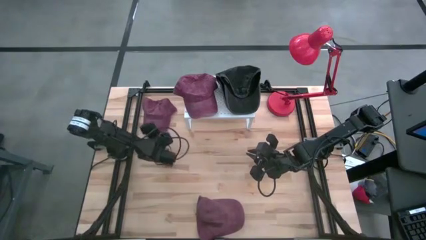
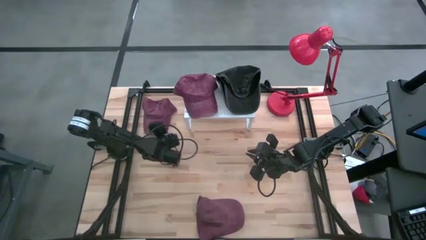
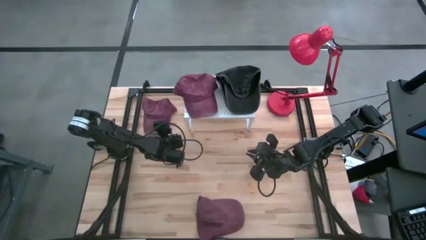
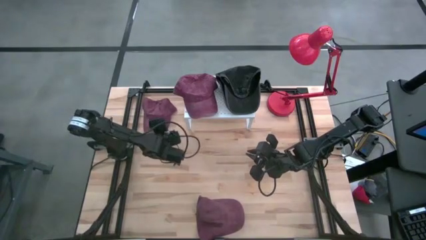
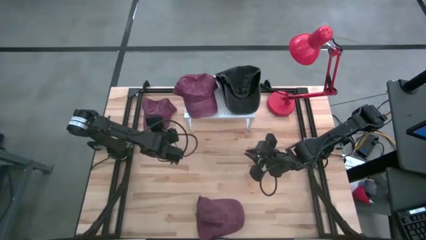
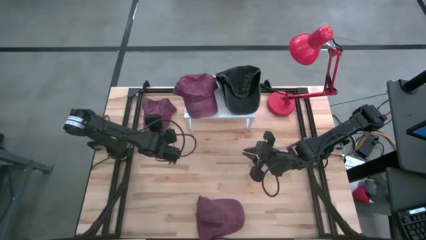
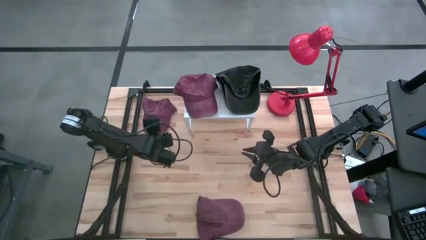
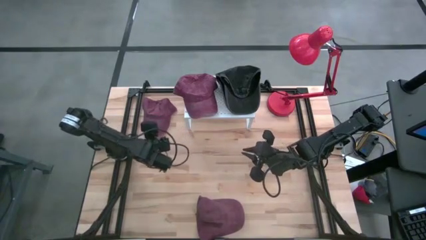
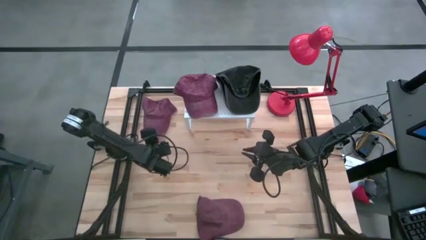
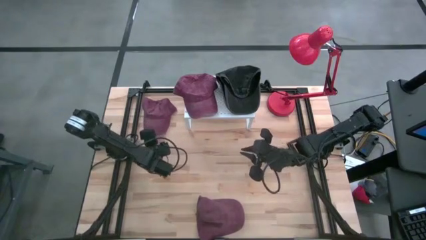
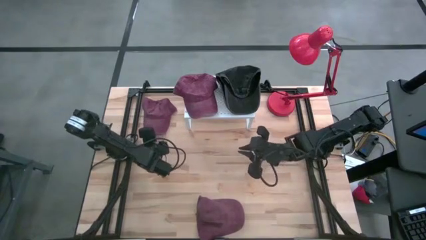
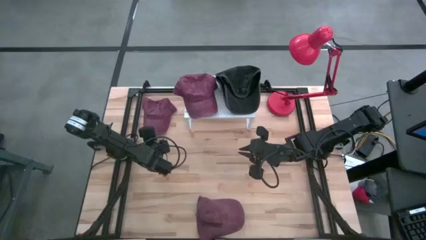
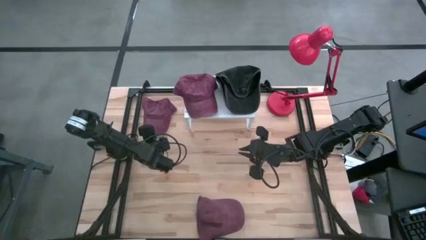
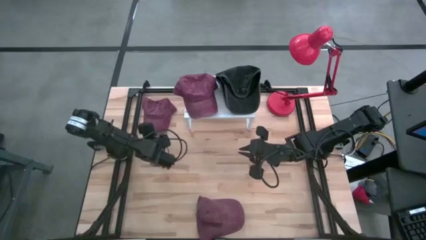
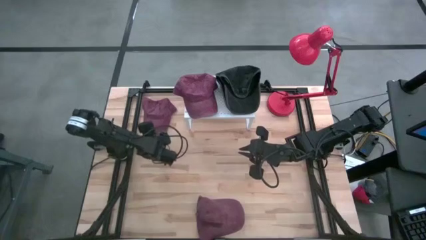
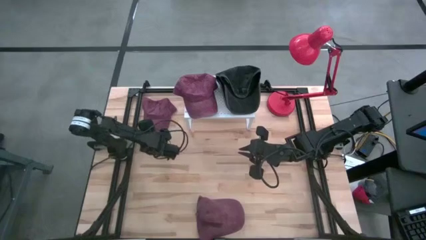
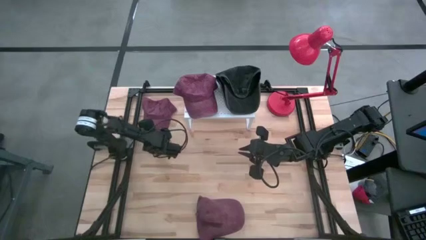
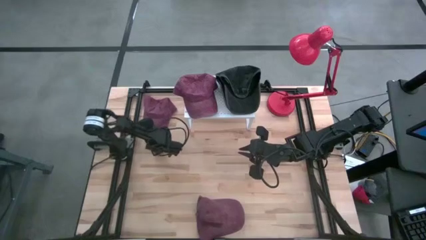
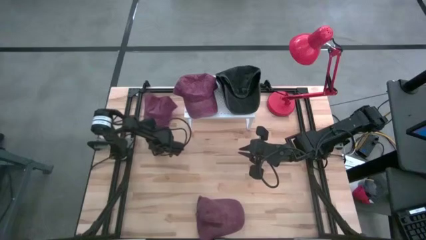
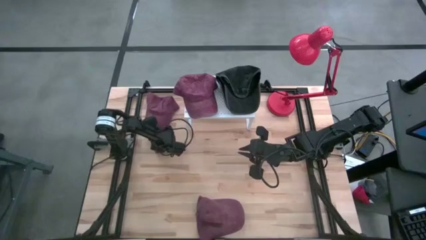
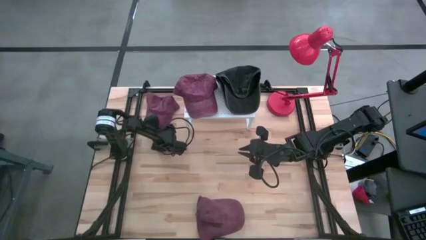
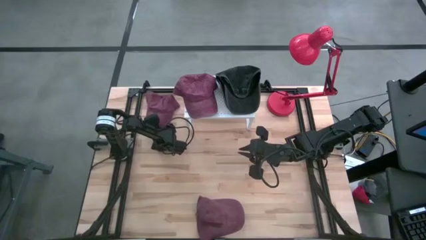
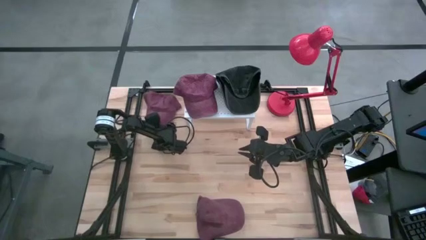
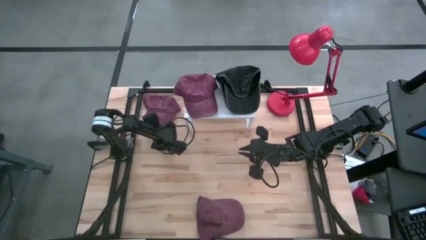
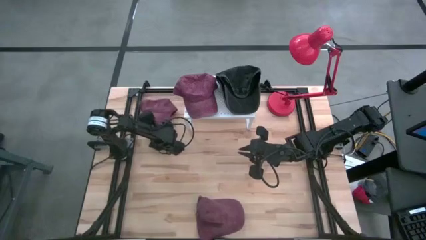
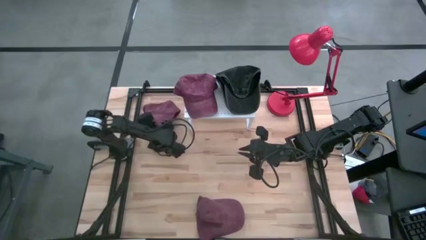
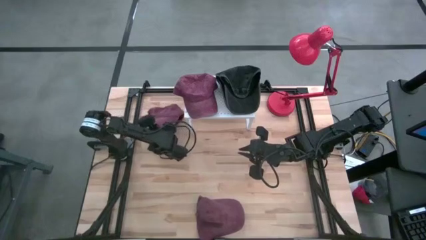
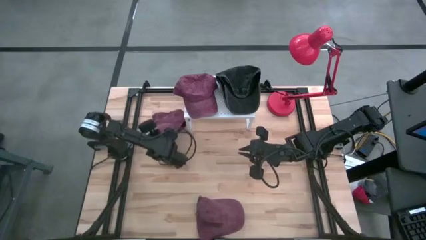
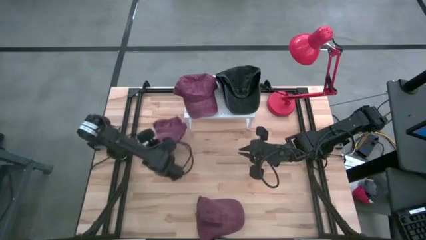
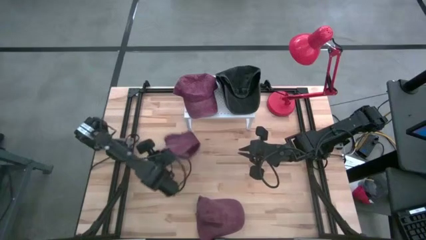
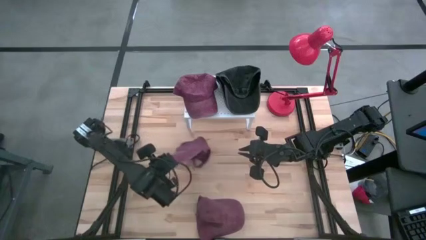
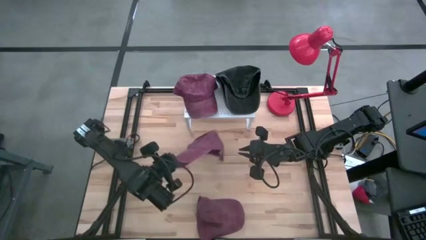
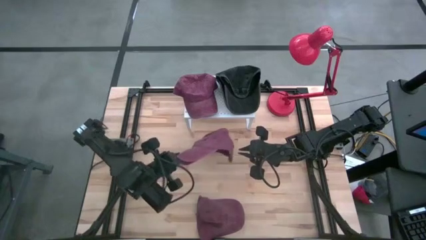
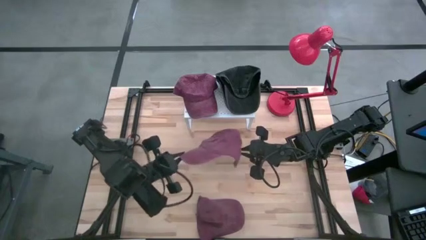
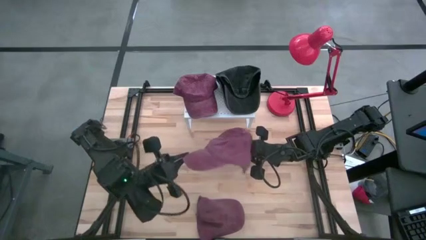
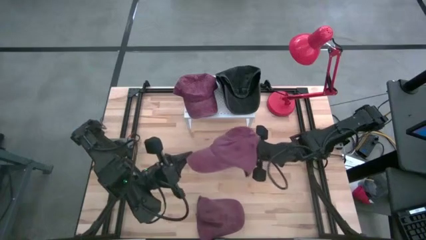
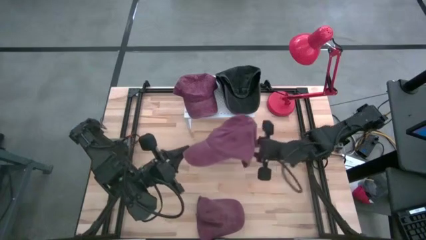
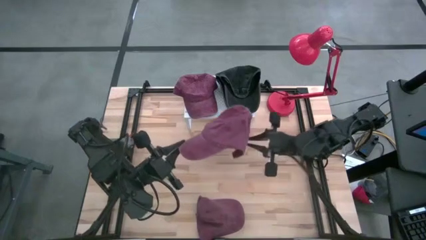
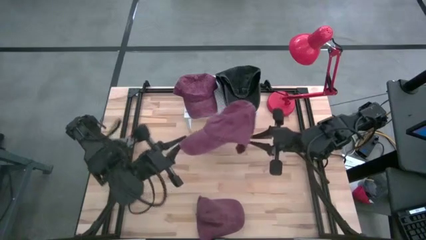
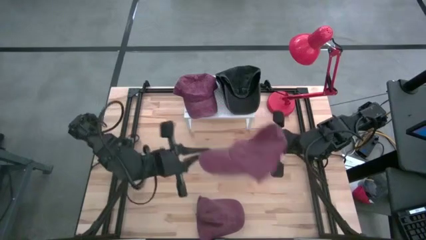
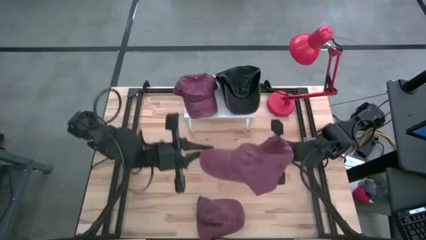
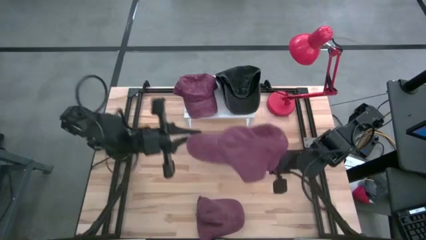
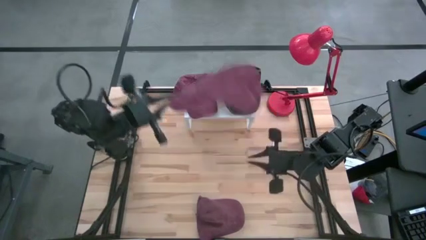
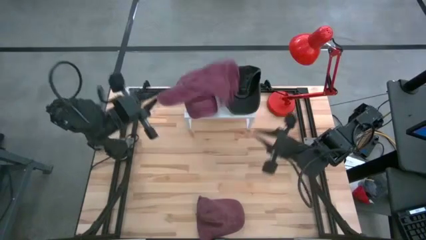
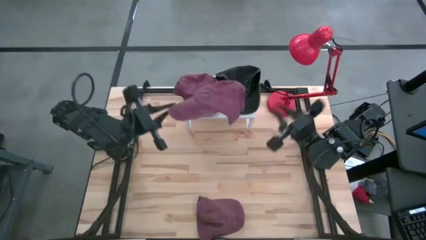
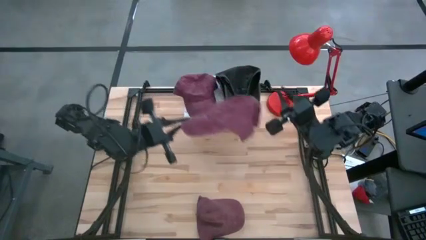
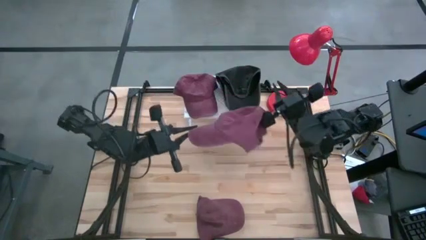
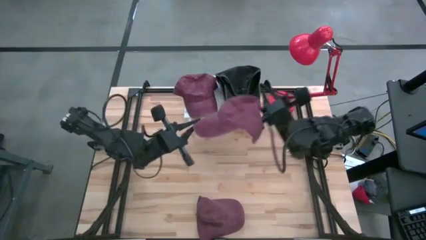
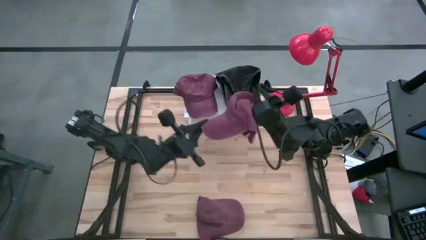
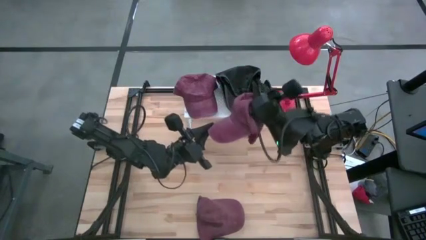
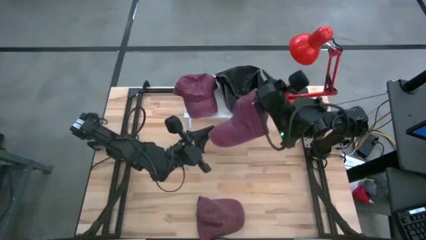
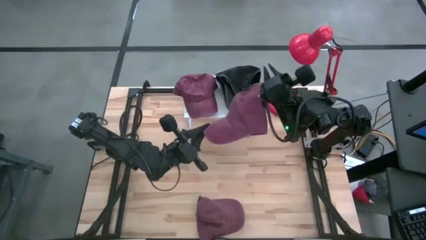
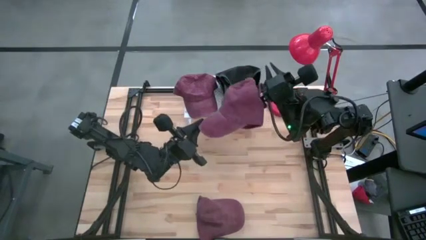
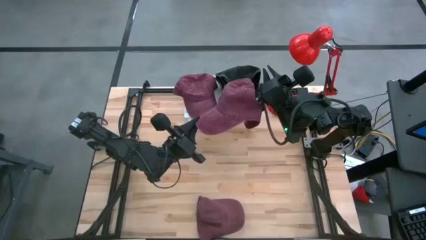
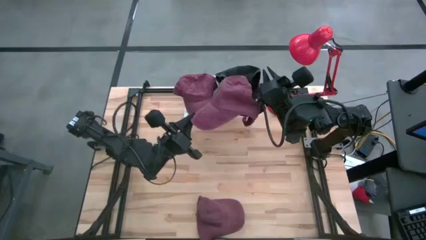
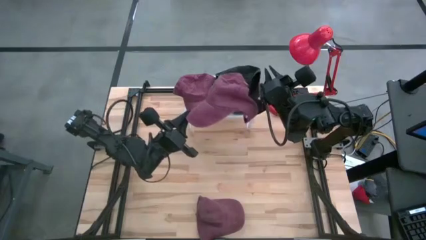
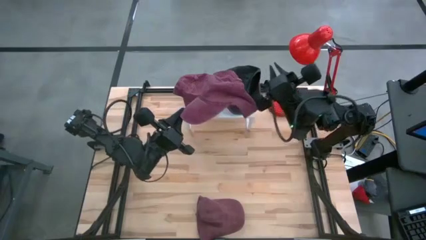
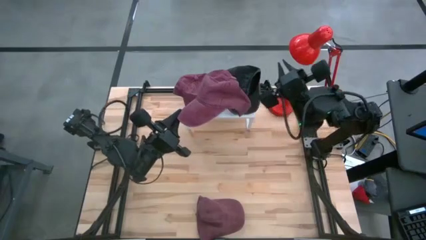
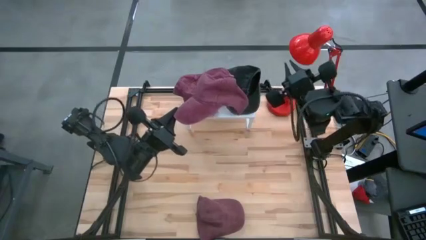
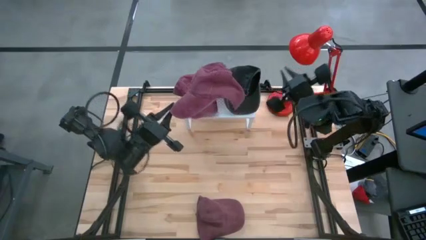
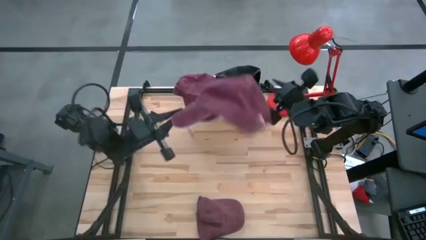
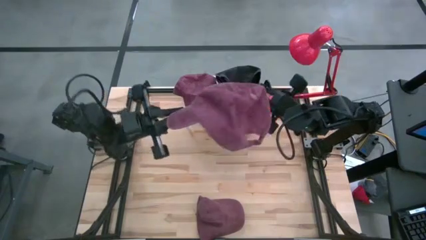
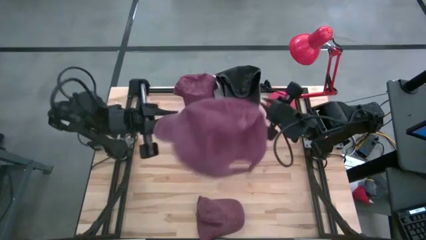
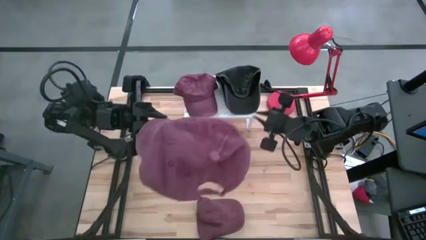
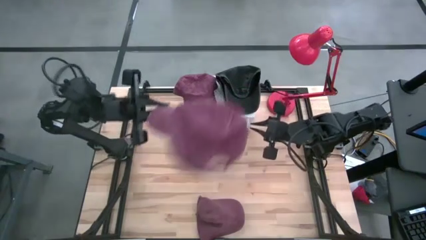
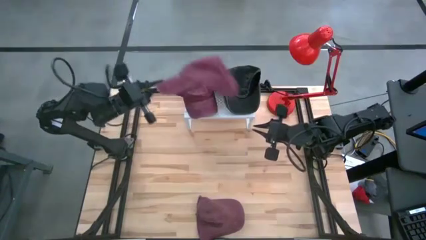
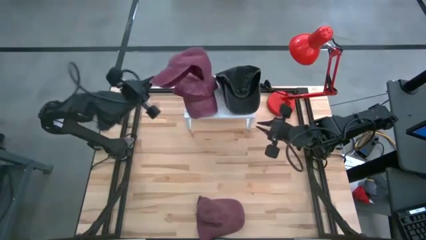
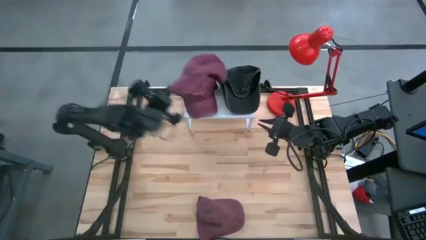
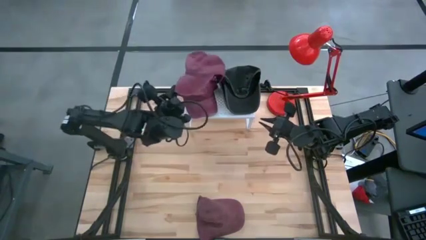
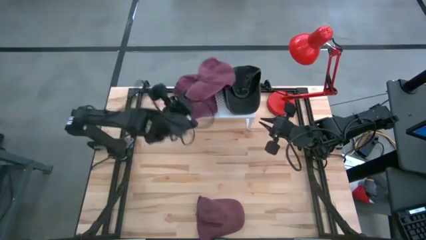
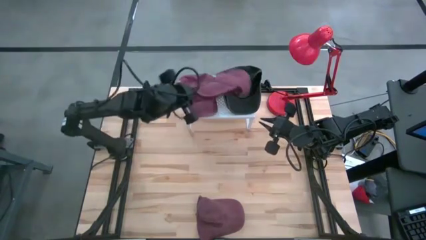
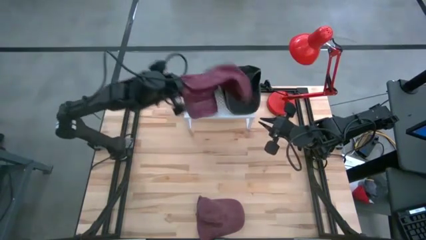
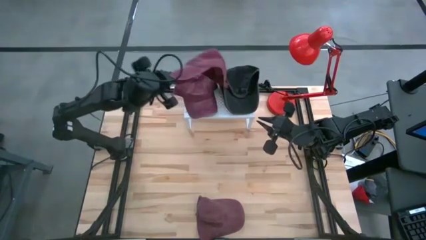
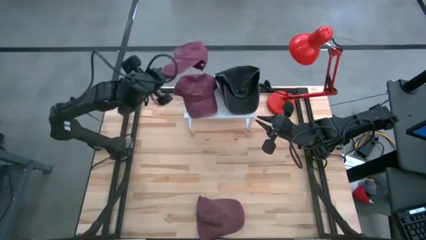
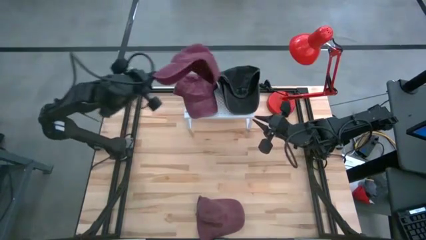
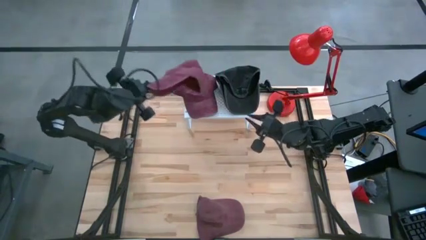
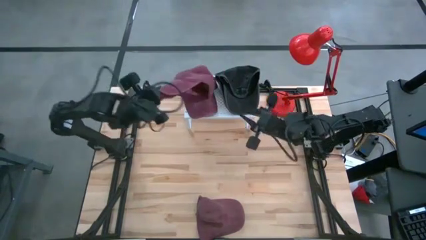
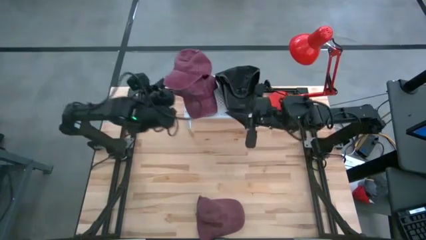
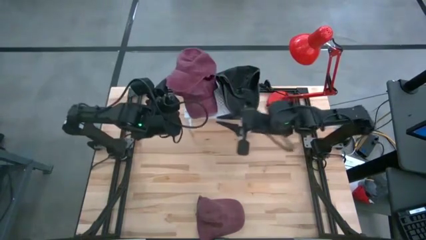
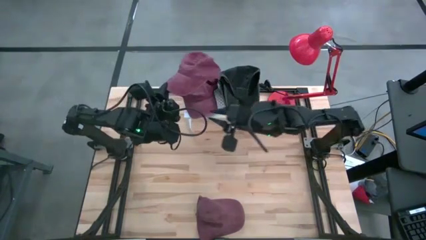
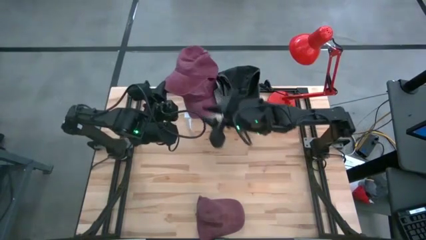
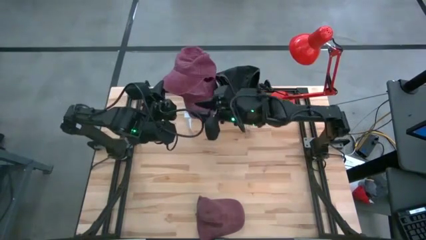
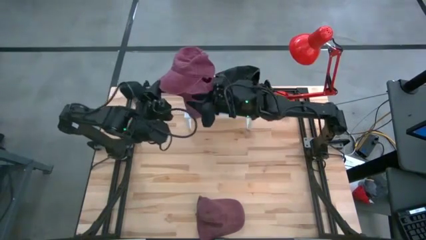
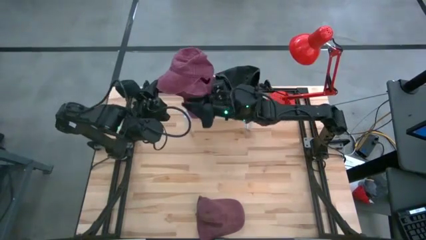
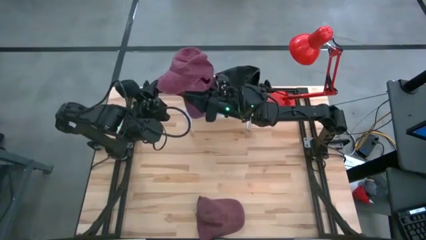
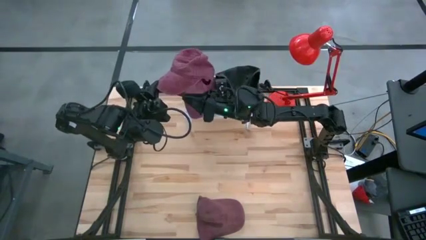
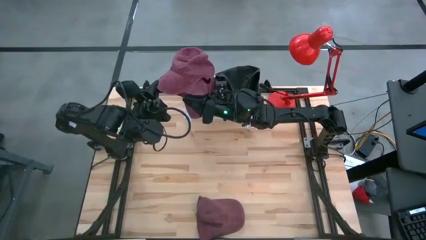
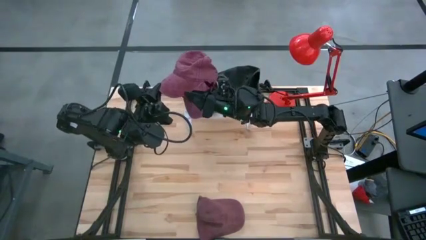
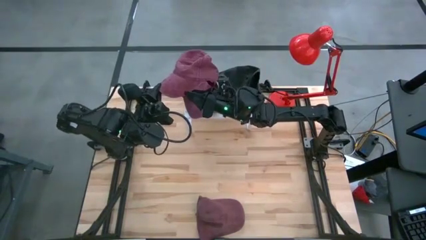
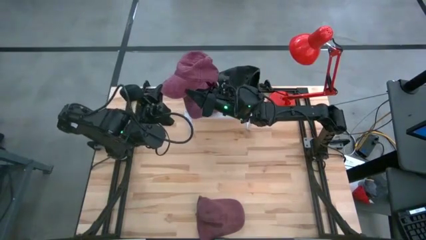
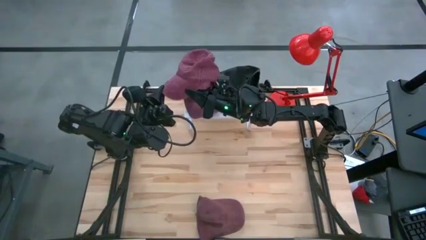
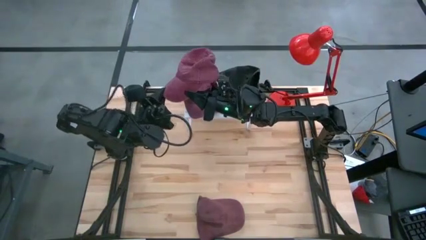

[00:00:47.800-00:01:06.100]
Task: Pick & Place hat
Stack the top red cap on the red cap on the shelf
